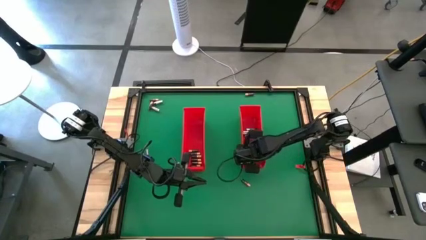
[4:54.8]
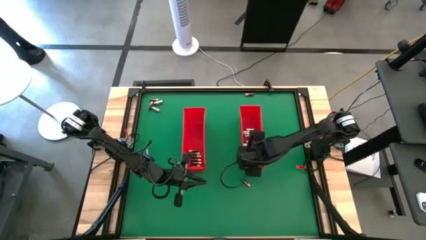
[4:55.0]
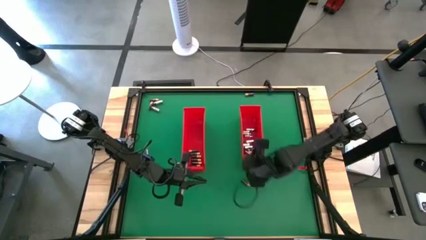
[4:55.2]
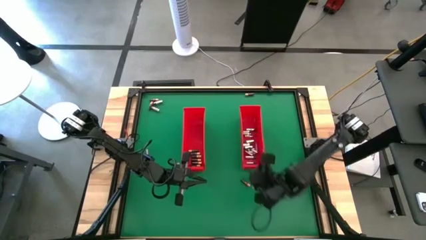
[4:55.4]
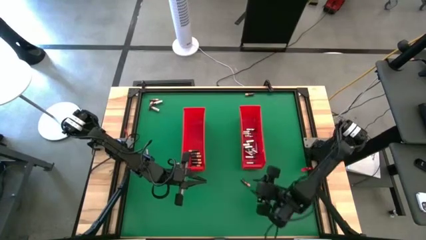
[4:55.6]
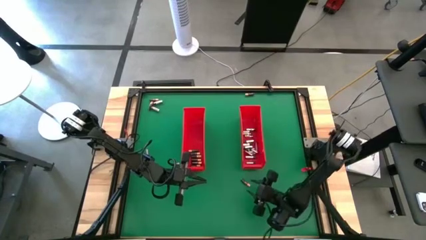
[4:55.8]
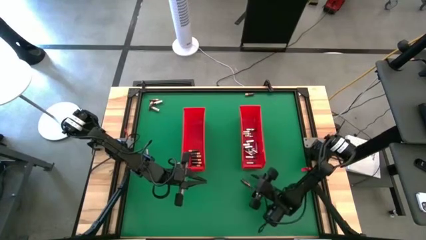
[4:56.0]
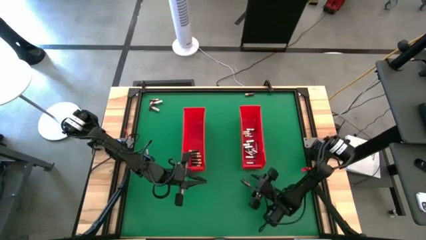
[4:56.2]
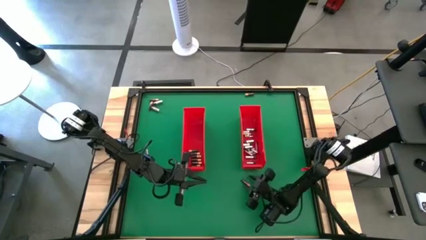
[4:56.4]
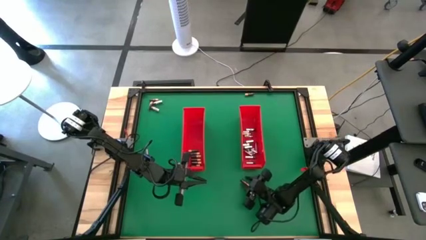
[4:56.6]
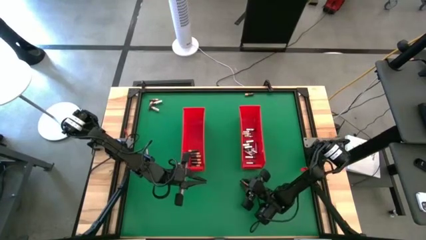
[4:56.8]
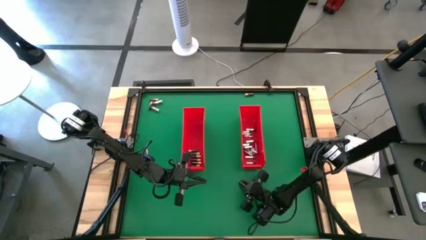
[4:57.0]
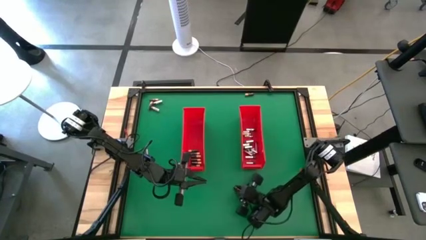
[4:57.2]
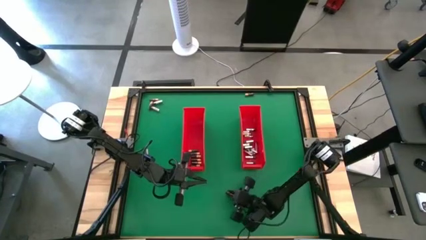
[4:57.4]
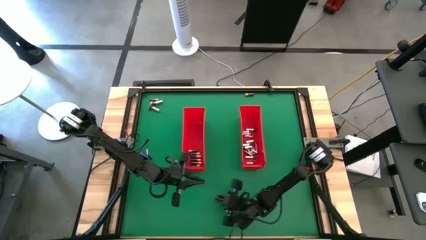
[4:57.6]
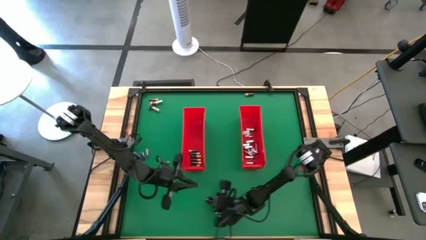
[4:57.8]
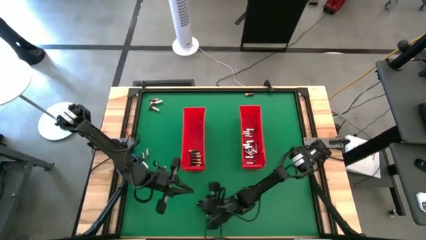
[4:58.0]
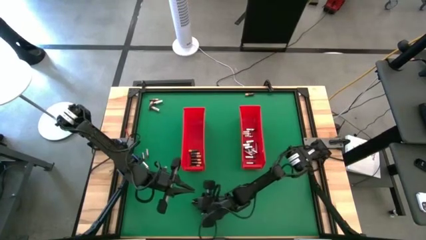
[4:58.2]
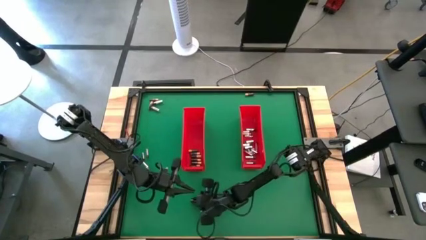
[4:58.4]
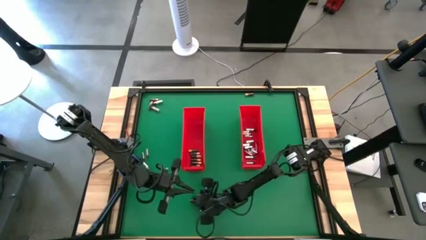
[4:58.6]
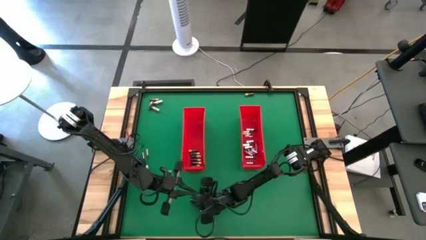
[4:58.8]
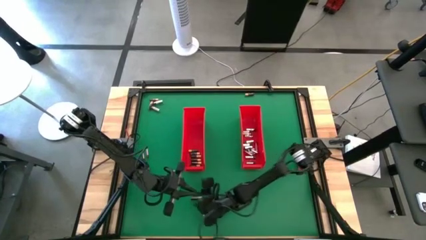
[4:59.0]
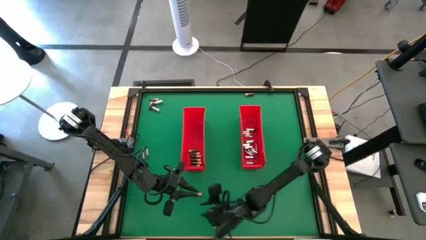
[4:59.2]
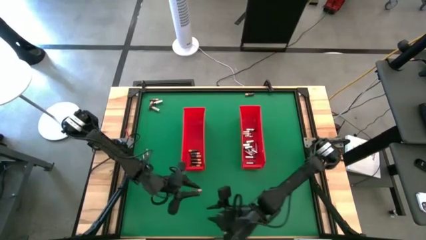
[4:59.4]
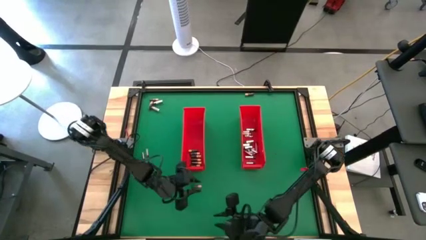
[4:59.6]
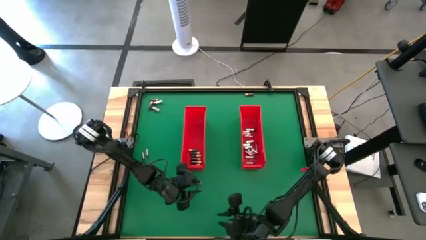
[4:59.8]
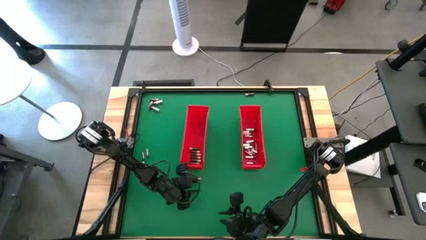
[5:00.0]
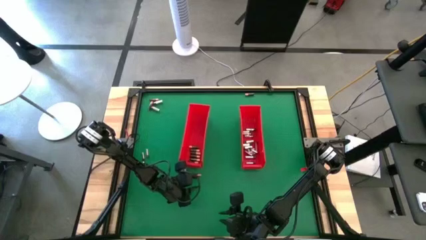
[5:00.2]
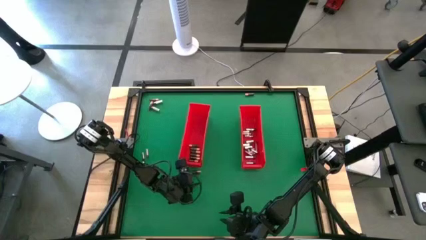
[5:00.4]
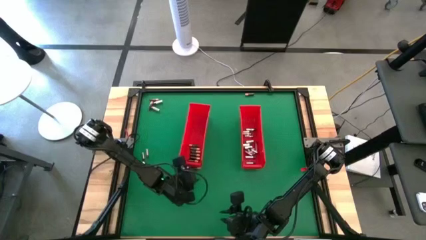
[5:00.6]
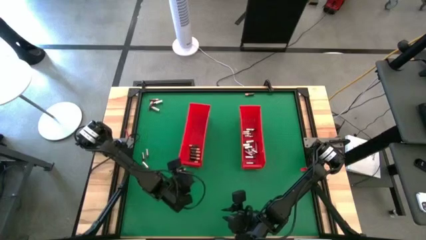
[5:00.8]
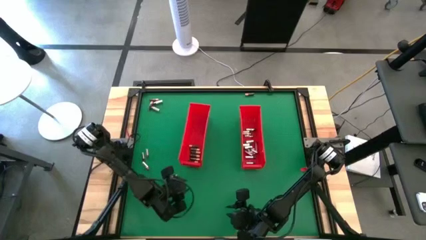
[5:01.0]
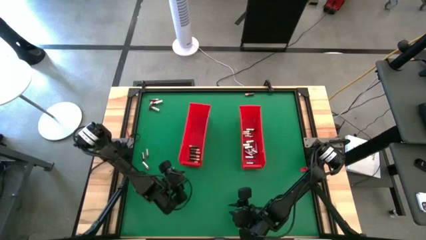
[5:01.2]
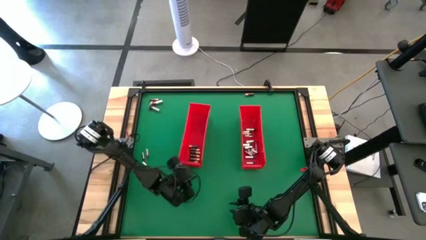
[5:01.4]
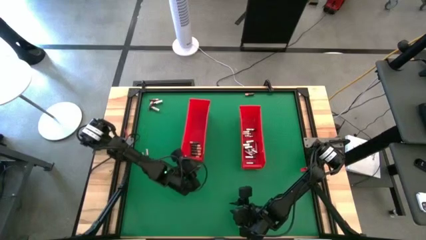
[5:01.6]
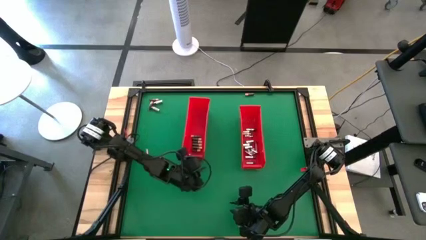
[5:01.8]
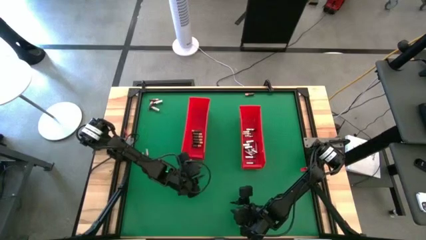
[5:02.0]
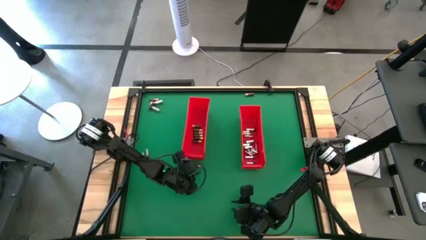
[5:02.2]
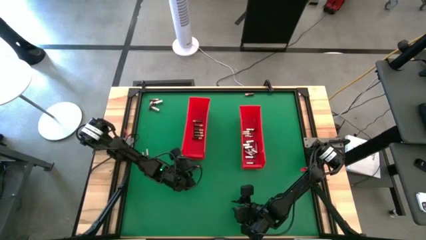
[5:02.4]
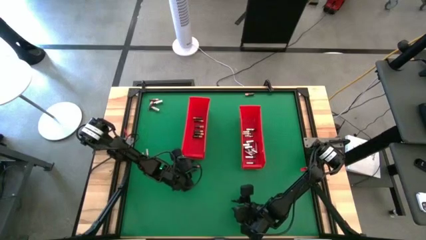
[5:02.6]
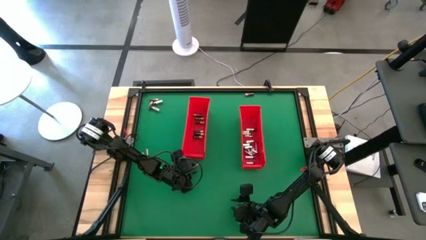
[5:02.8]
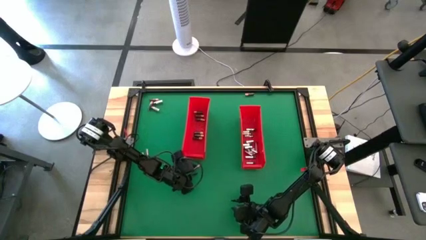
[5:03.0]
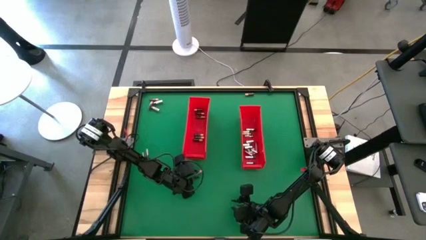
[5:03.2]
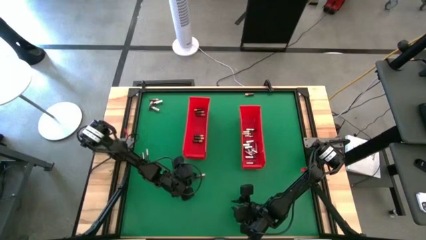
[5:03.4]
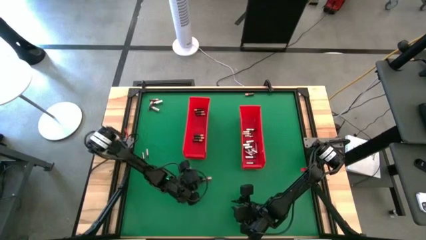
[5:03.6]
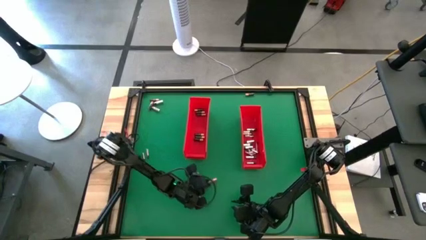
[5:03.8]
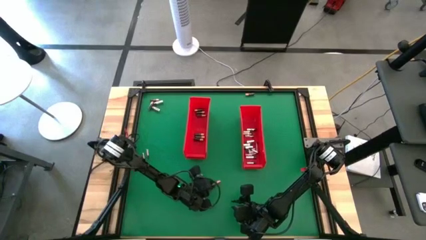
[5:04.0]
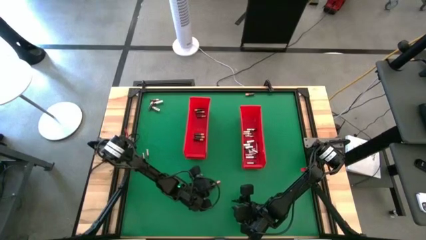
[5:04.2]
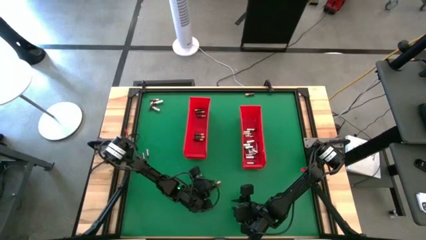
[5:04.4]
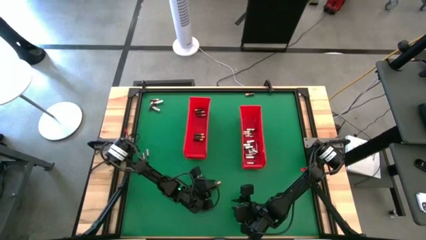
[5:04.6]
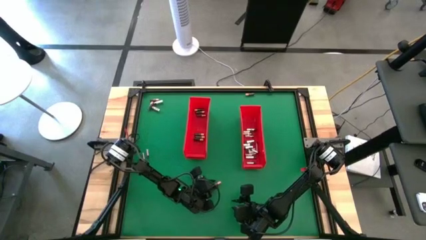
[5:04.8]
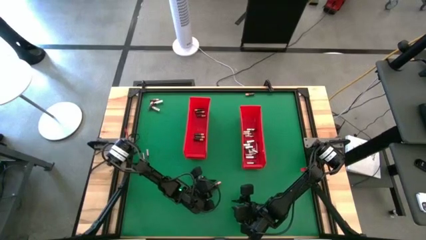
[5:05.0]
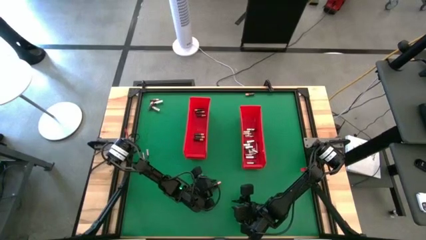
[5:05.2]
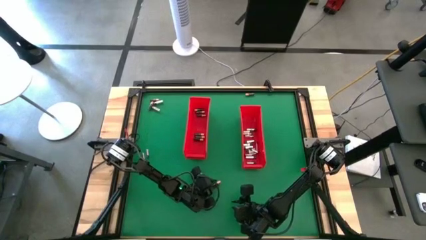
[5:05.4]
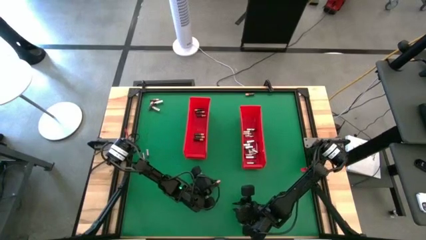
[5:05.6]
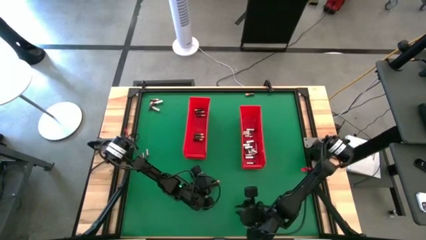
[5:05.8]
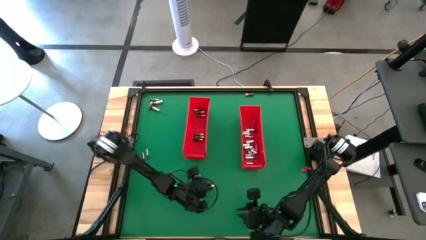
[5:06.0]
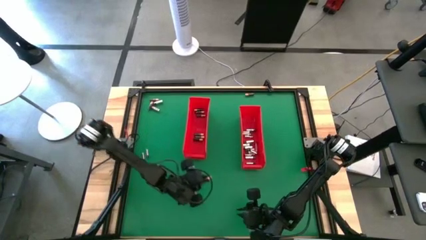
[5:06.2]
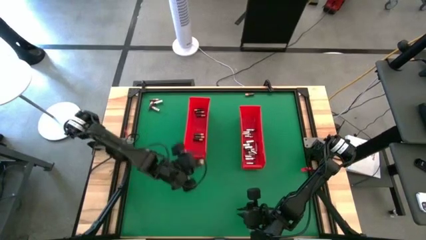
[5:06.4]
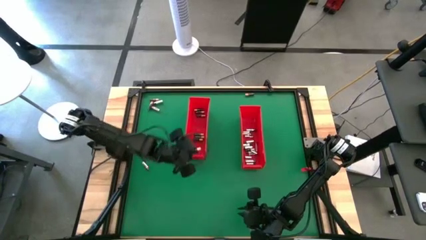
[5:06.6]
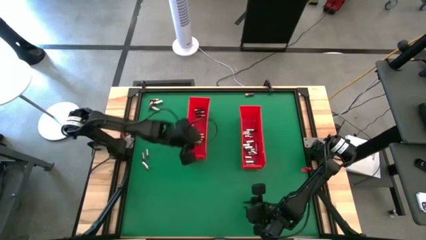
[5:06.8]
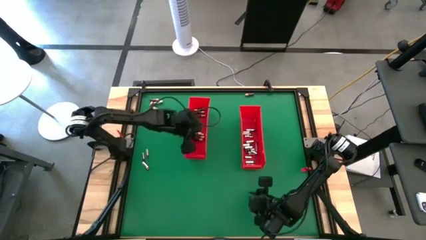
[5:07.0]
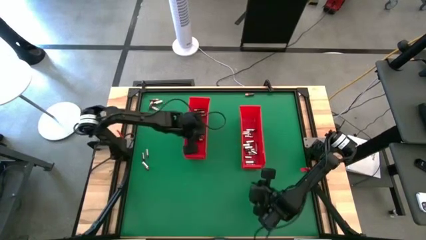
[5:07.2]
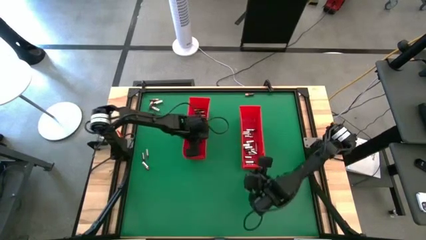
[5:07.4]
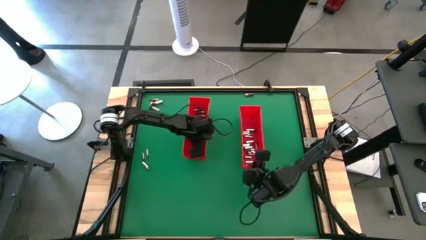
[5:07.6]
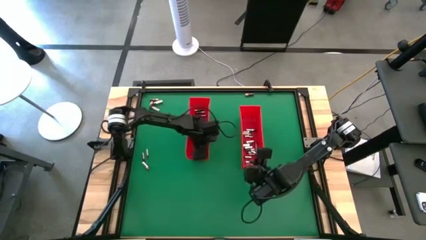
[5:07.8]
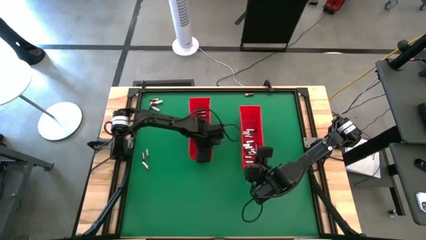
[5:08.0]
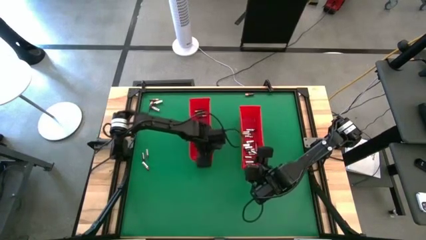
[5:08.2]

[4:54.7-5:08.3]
Task: Sort batteries
Put the brown battery into the left red bin

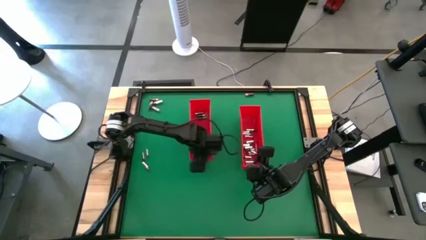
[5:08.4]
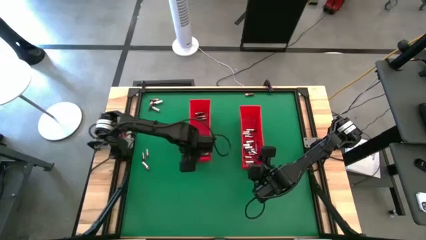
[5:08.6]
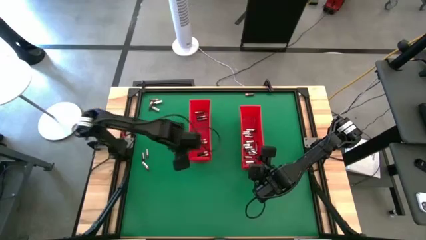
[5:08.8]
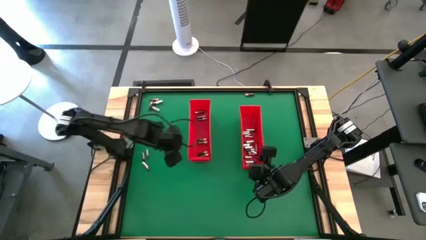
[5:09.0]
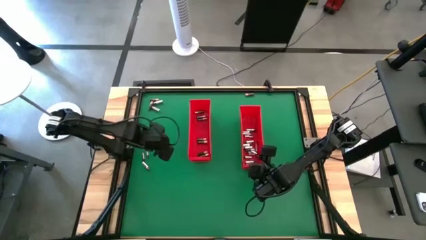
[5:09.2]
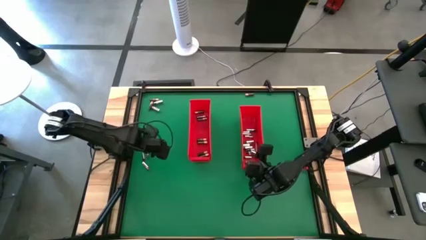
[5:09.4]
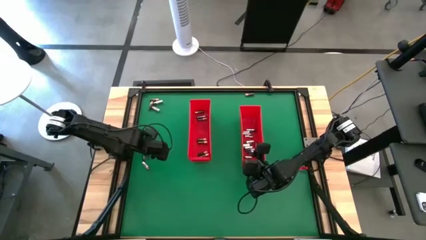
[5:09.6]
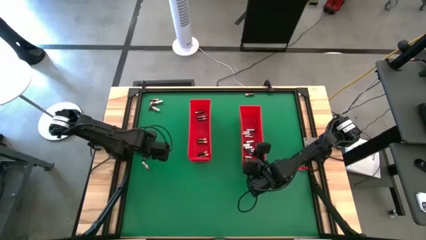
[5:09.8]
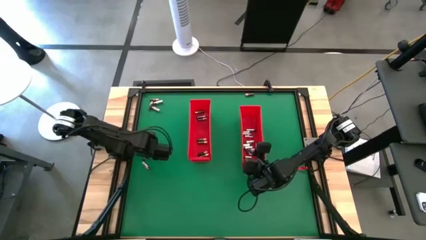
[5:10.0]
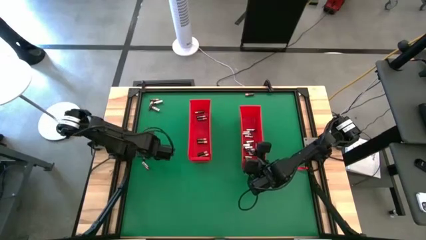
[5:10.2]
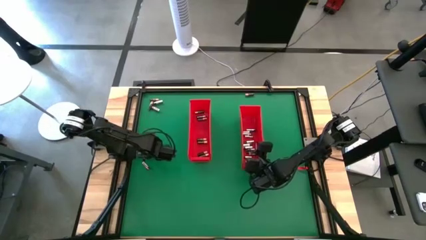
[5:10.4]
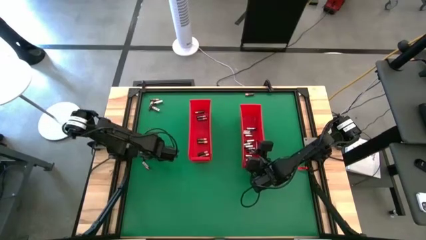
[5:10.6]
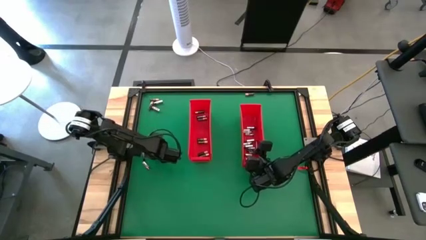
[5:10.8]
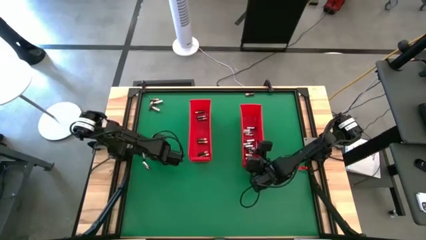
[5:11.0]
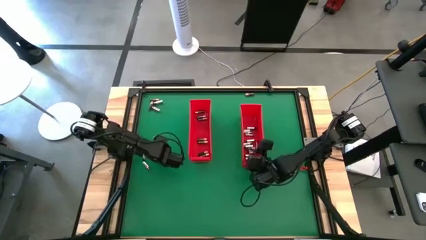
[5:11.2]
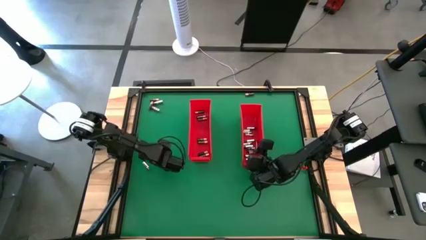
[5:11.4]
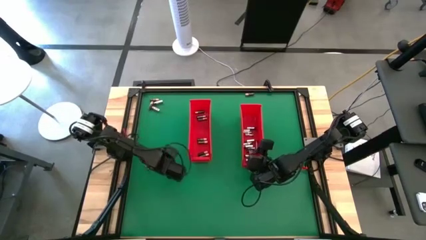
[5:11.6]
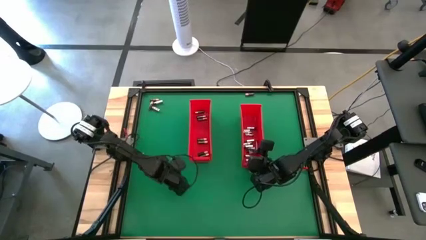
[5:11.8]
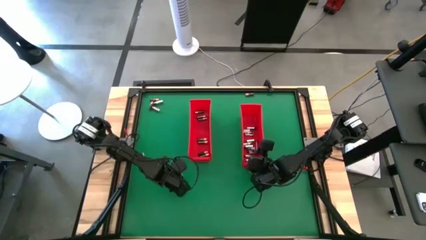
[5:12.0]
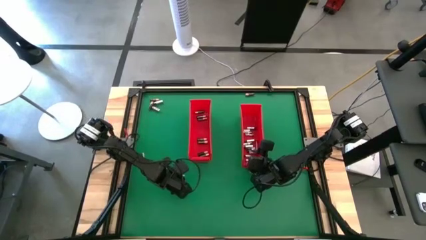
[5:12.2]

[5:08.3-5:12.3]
Put the silver battery into the right red bin
